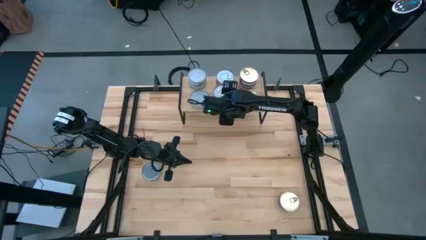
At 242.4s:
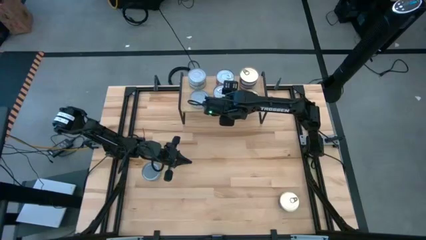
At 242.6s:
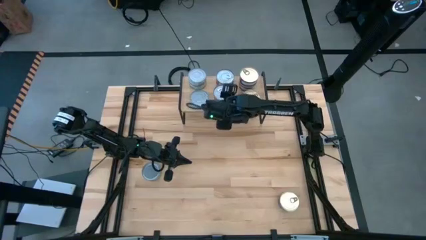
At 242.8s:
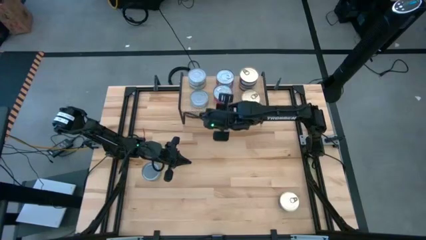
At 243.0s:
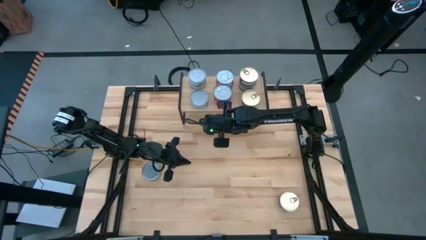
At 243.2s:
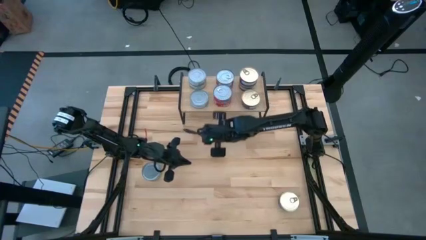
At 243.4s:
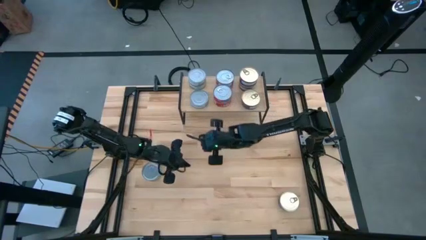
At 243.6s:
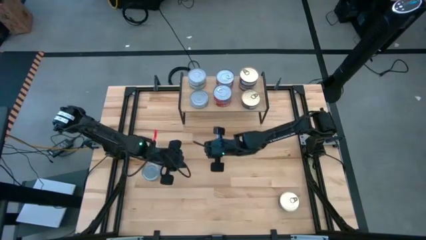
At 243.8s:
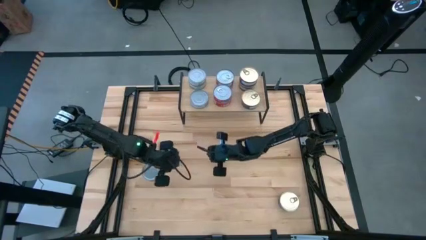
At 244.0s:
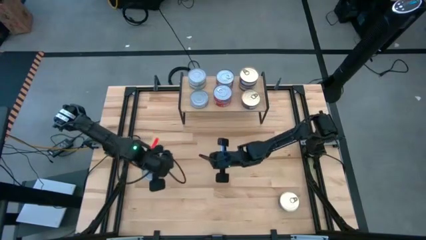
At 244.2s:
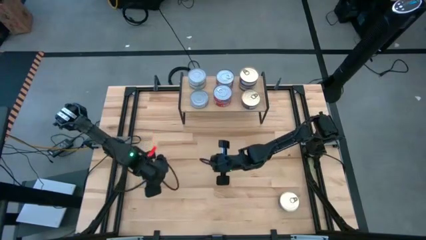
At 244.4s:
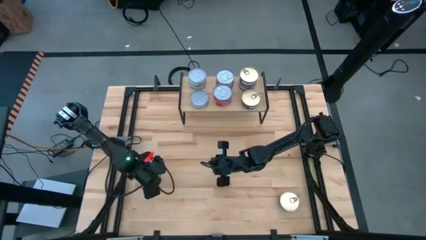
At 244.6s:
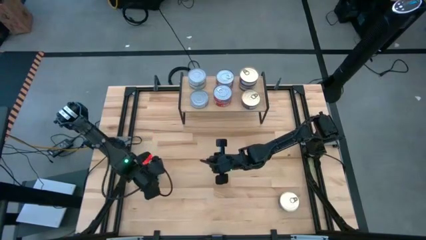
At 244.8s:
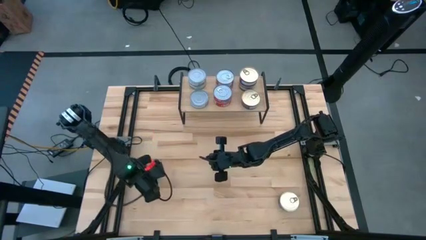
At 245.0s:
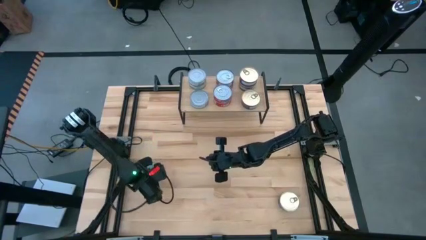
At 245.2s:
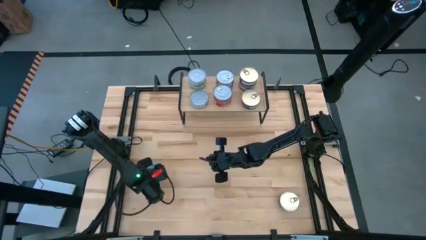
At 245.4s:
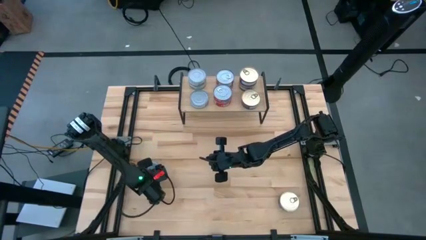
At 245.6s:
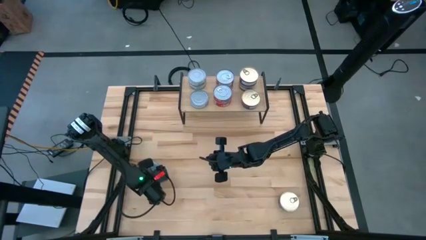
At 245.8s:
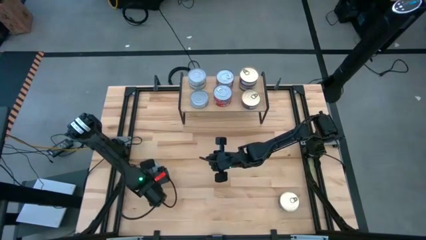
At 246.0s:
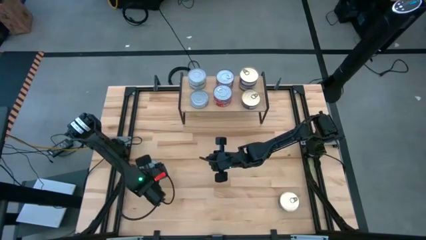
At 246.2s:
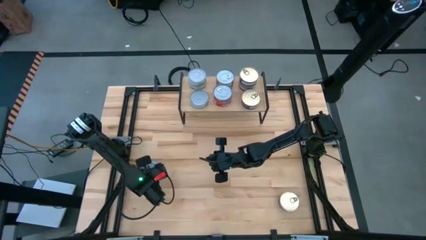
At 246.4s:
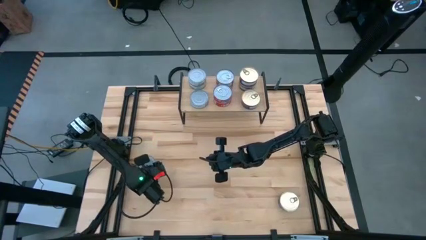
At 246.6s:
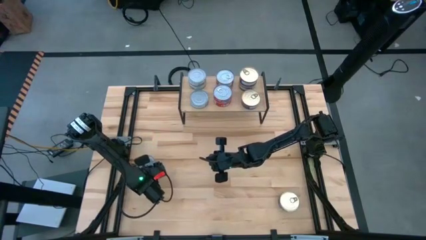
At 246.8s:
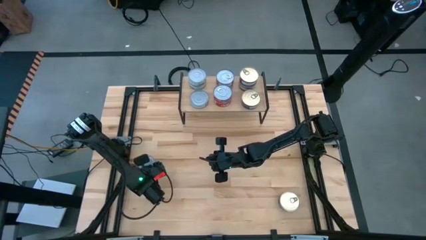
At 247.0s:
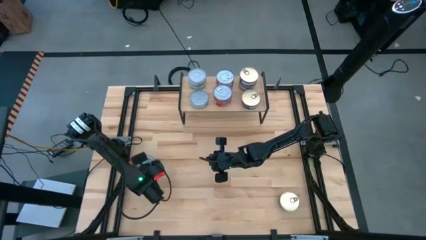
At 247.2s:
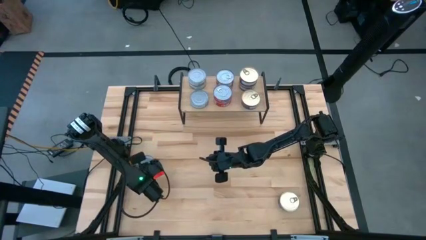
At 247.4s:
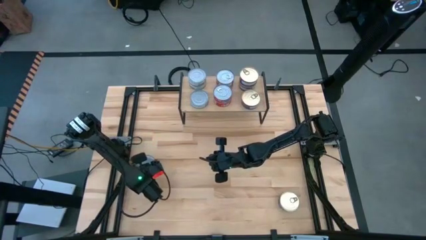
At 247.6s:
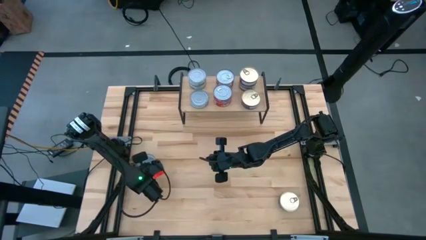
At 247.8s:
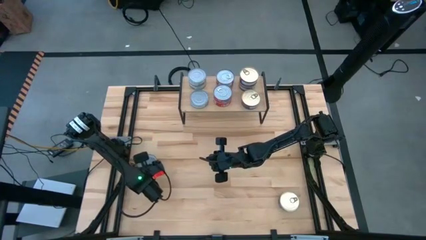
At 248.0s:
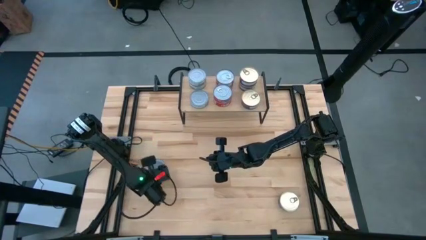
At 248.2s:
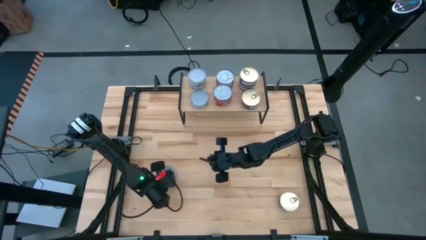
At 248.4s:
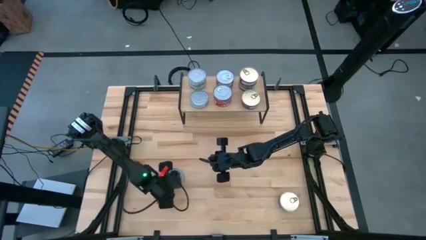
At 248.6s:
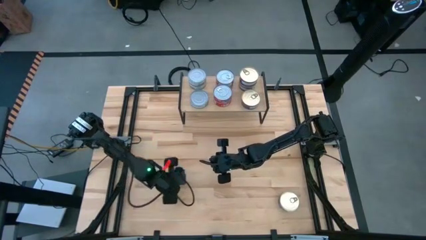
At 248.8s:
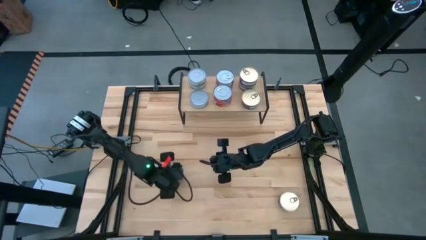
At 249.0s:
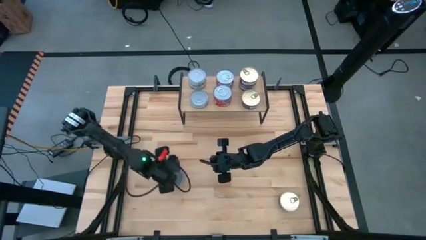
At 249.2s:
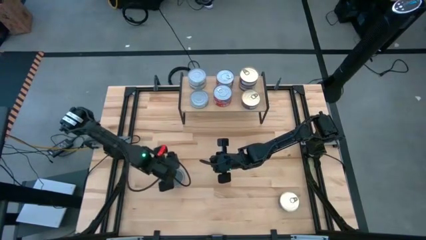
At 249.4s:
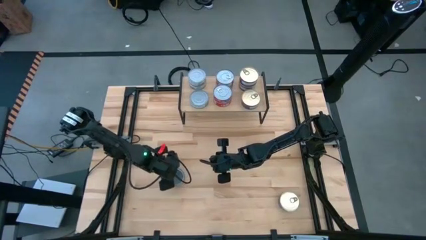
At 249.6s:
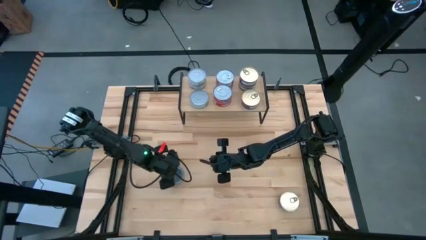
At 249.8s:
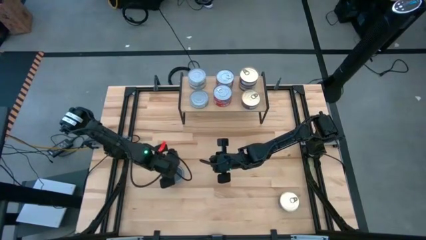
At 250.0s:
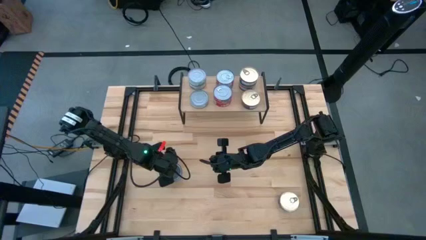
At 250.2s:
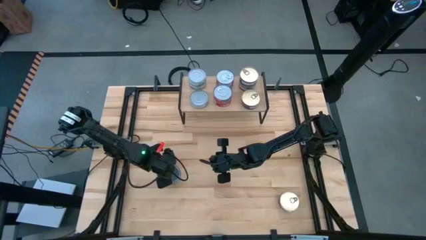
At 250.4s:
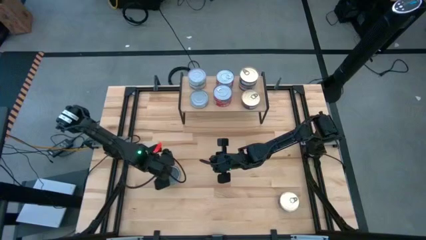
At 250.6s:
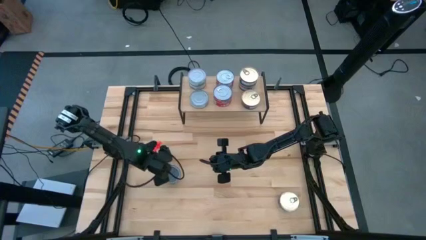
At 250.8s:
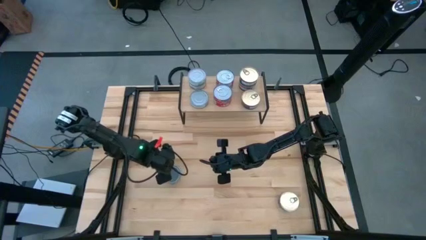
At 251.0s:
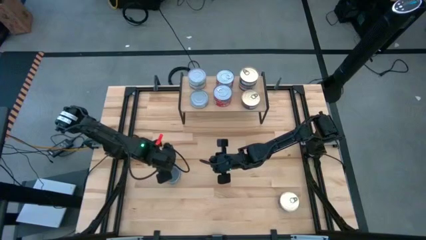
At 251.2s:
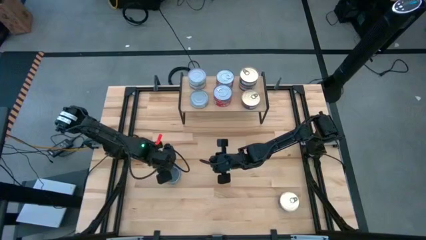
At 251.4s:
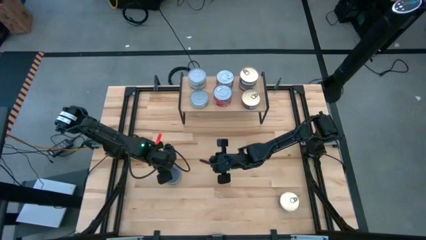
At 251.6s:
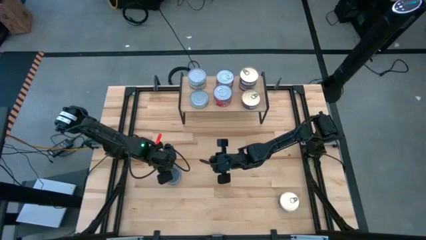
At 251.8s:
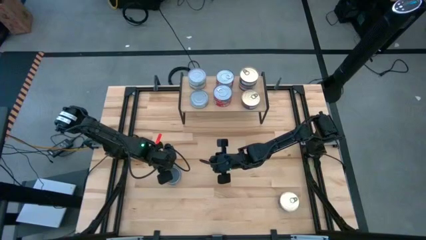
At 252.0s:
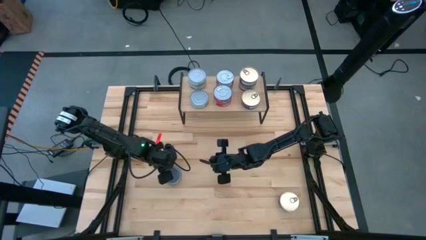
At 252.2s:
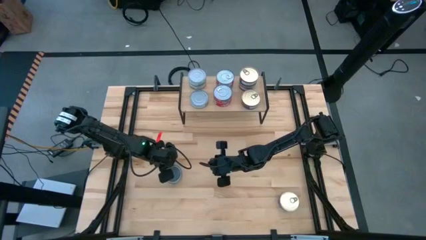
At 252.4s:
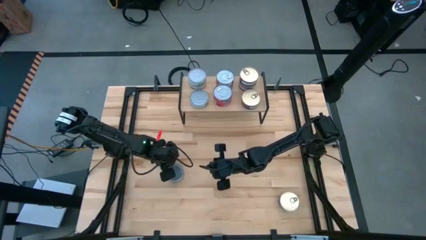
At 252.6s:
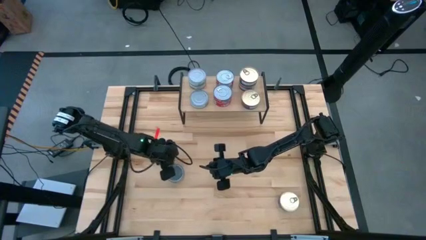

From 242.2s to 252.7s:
Task: Stack canned seafood by type on shelf
Stack the green and white tuna can on top of the green and white tuna can on the shelf

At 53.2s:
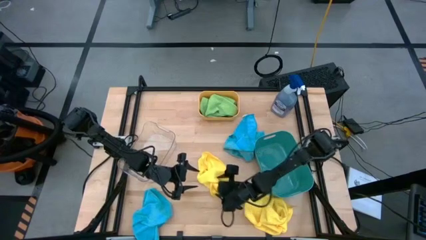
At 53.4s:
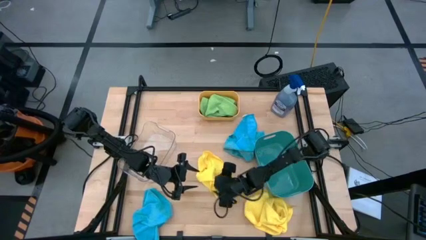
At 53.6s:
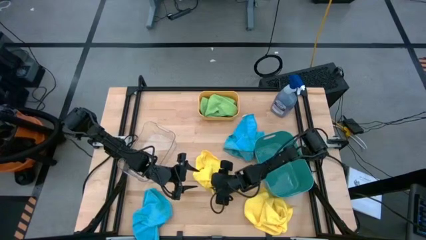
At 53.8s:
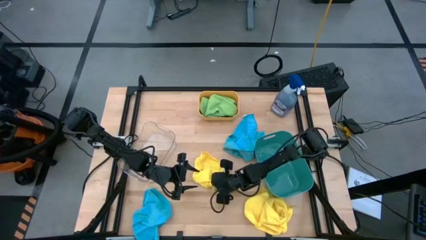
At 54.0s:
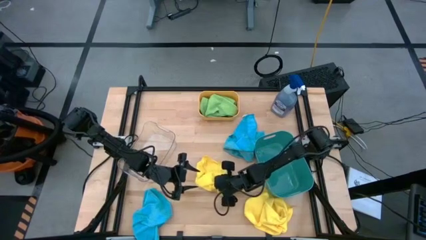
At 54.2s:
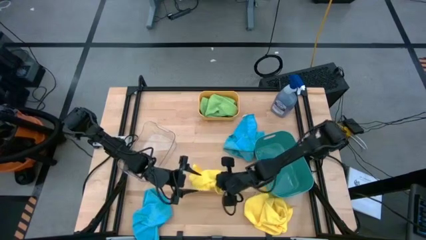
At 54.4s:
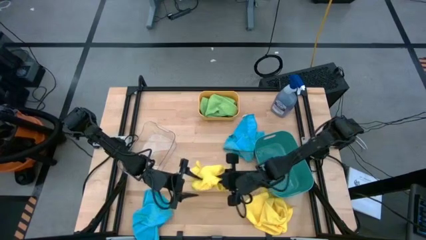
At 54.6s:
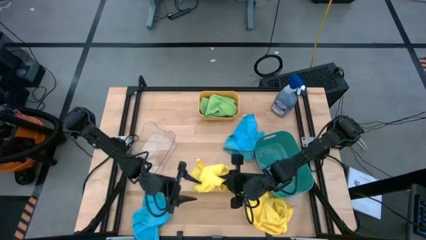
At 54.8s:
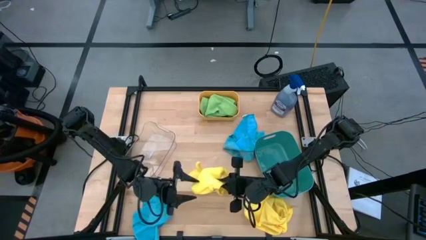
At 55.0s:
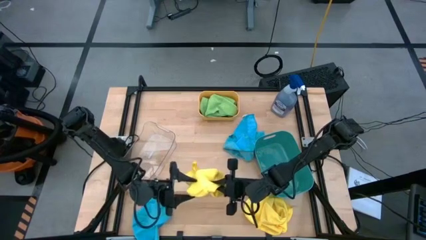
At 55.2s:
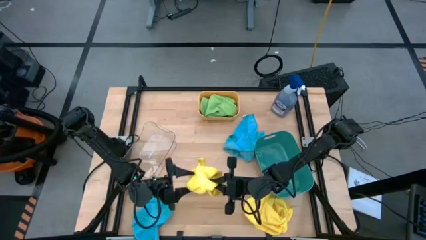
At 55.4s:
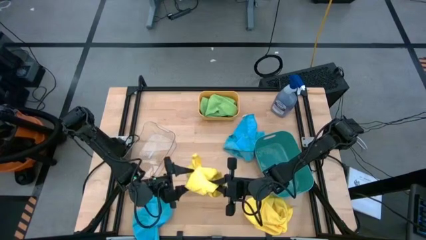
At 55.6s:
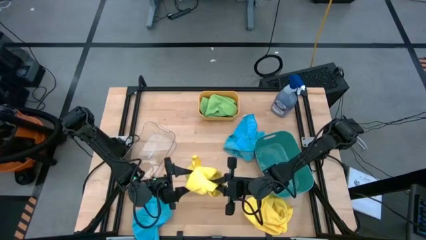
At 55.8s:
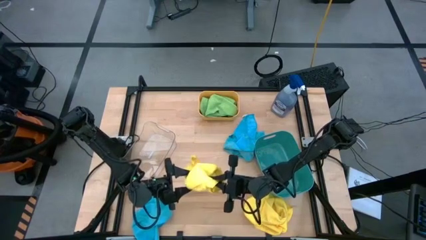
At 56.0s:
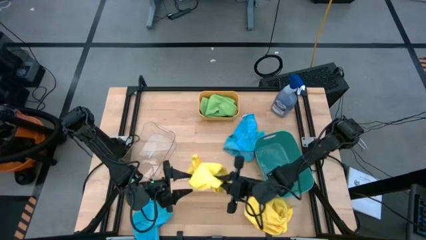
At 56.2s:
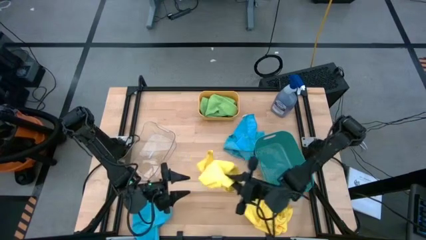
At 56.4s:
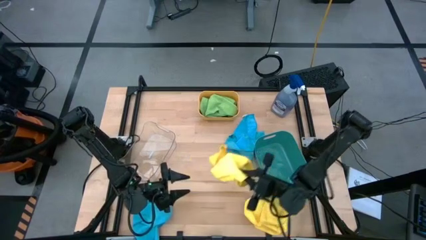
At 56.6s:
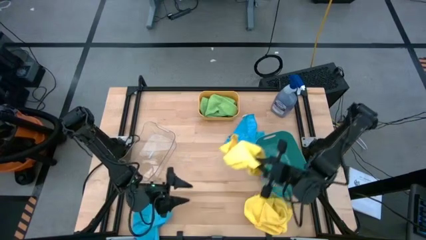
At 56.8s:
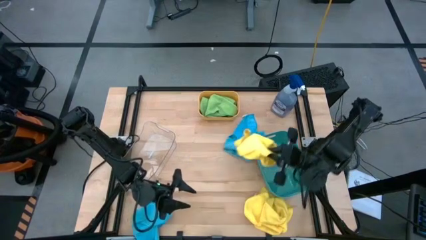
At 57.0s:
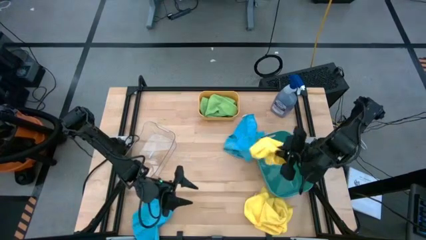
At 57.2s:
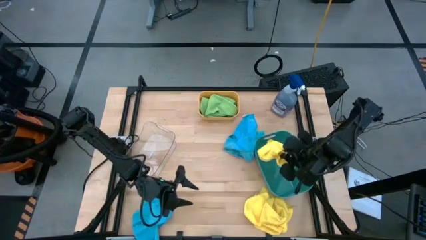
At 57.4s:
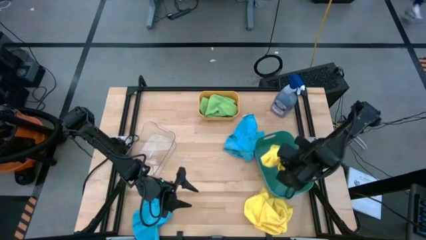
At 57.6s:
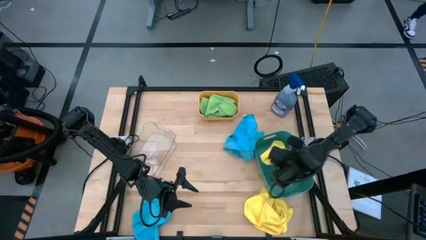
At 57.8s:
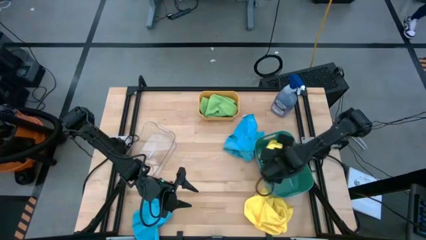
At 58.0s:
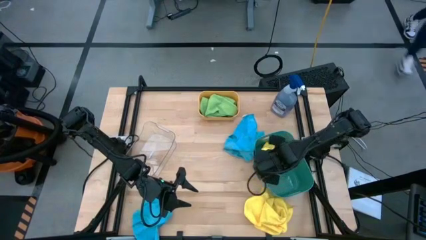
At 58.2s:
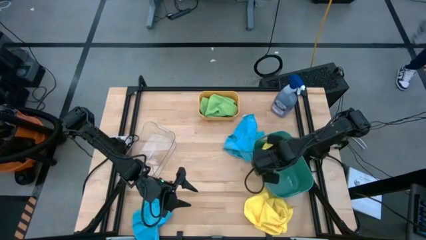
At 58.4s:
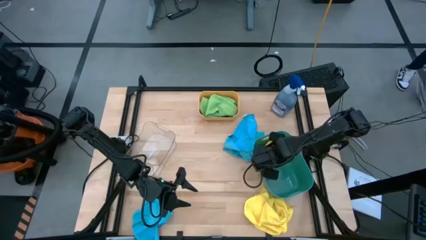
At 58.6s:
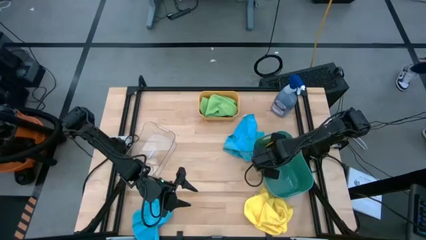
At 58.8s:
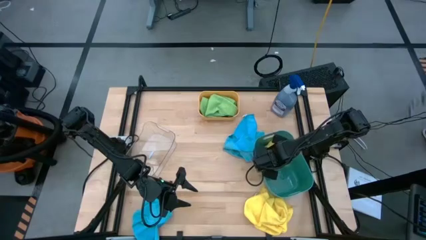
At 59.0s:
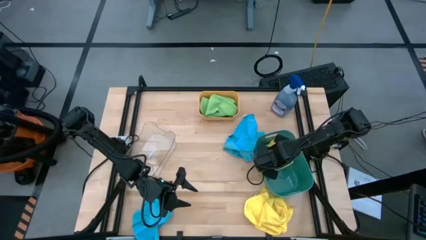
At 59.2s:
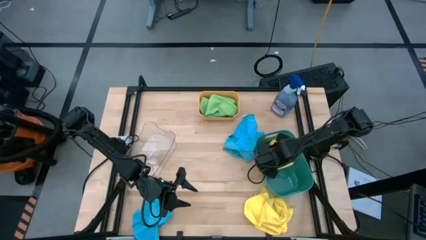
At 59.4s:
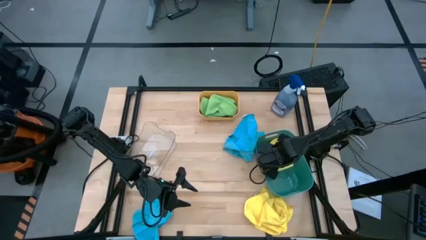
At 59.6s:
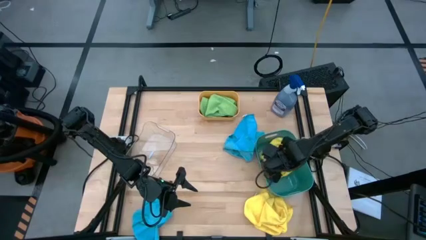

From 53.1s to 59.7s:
Task: Sort microfiber towel by color & place in baskets
Put the top yellow microfiber cloth into the green bin

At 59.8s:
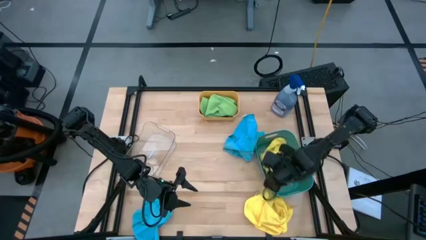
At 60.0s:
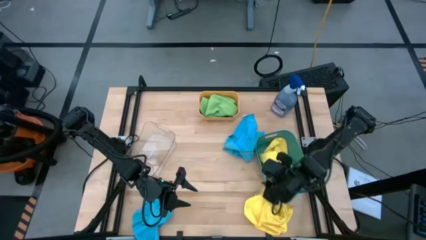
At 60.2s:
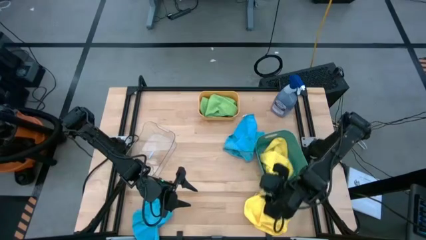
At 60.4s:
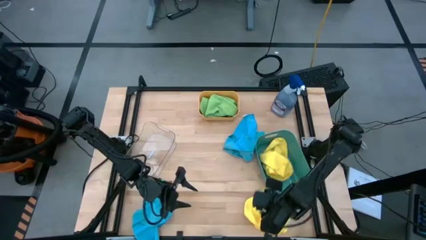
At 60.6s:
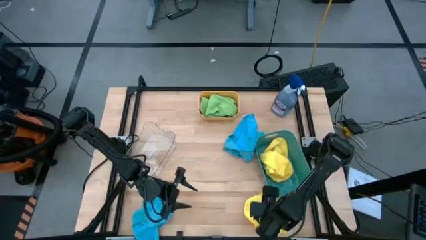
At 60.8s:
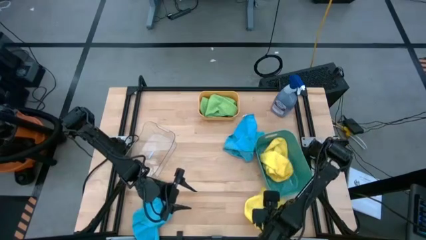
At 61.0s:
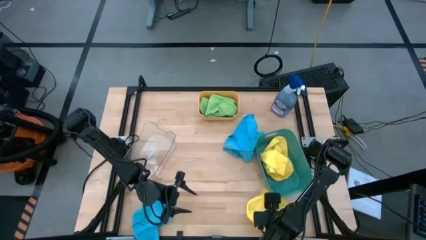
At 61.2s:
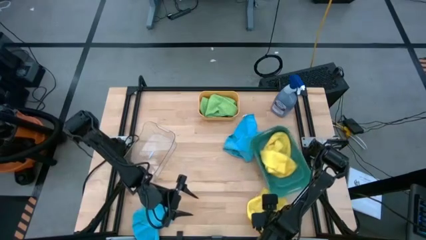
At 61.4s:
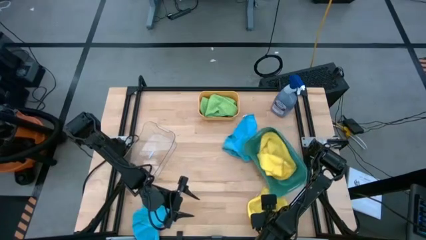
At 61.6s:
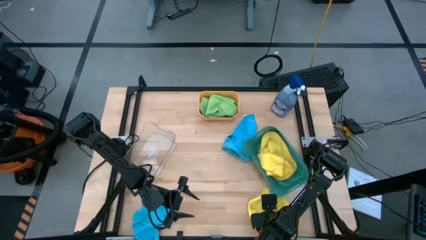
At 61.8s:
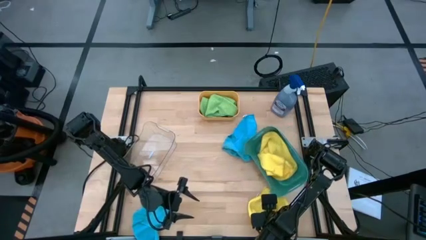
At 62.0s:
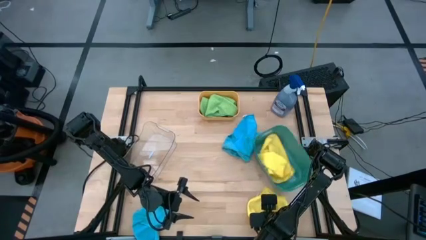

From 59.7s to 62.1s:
Put the yellow microfiber cloth into the green bin
